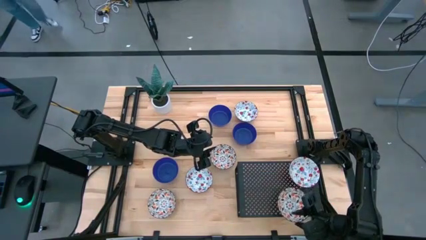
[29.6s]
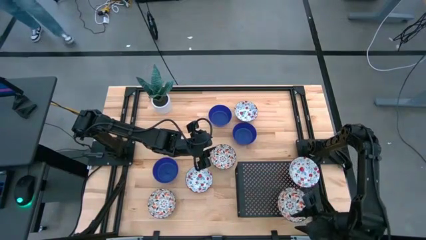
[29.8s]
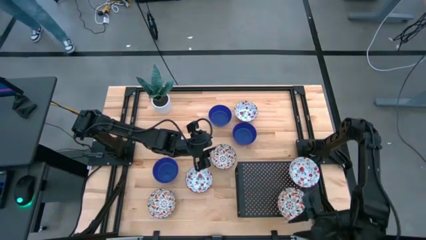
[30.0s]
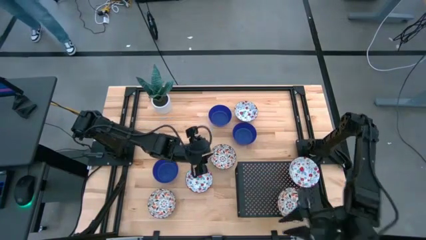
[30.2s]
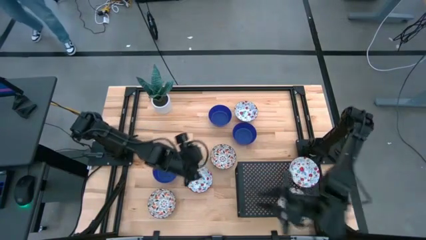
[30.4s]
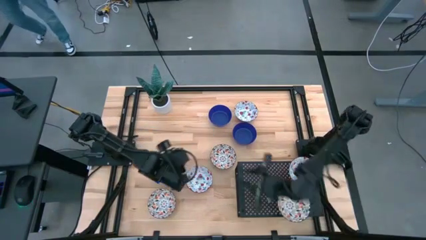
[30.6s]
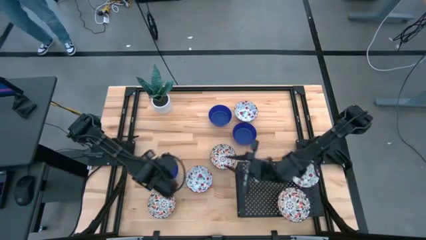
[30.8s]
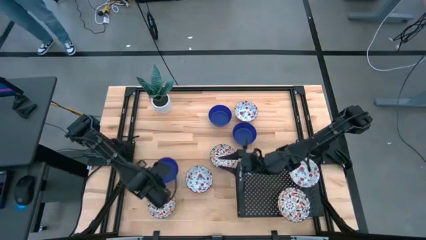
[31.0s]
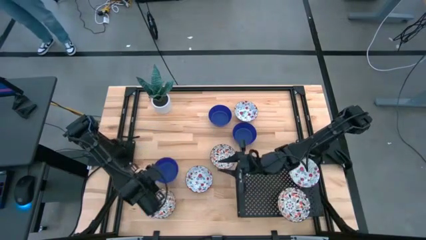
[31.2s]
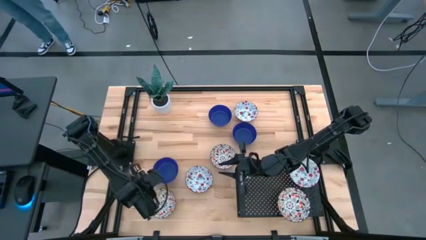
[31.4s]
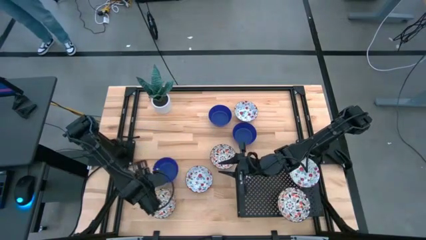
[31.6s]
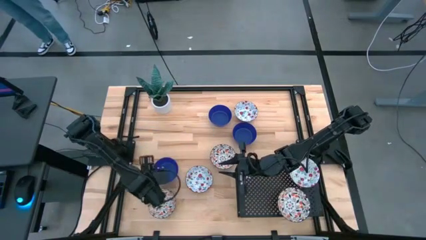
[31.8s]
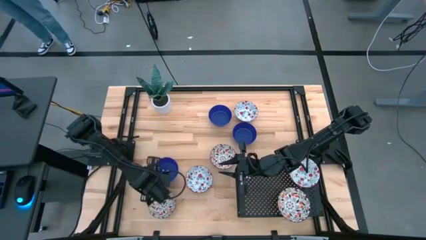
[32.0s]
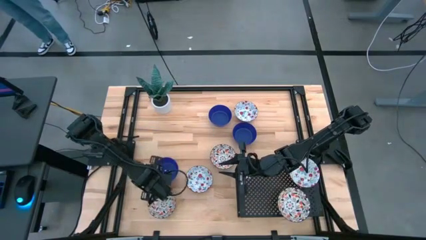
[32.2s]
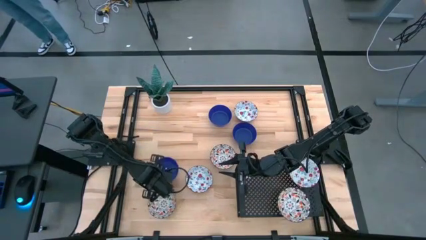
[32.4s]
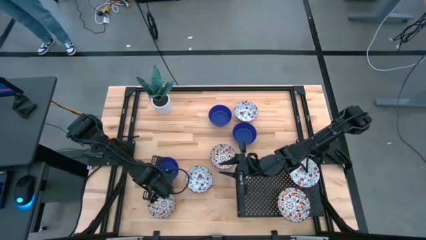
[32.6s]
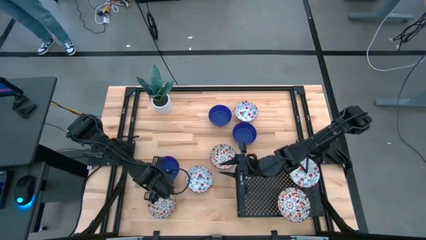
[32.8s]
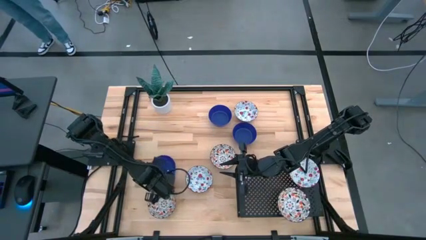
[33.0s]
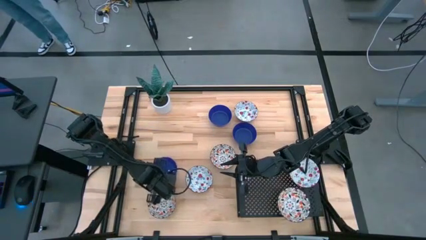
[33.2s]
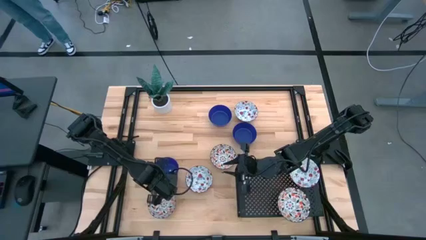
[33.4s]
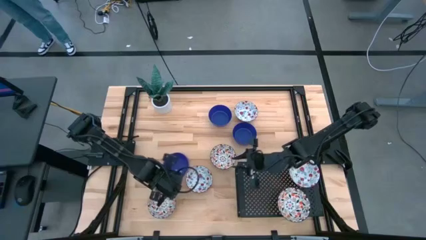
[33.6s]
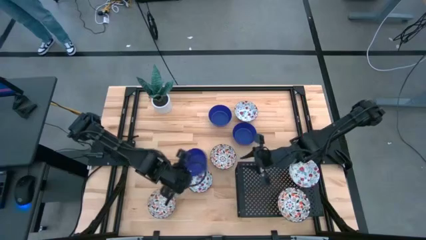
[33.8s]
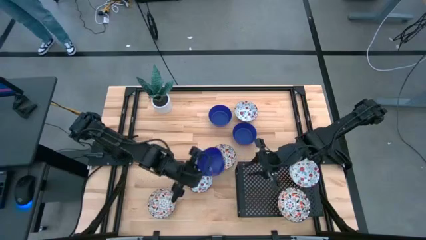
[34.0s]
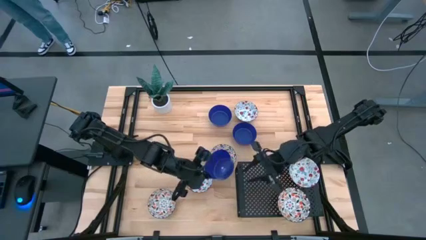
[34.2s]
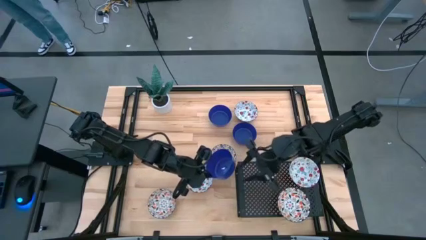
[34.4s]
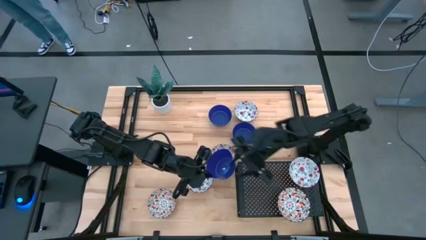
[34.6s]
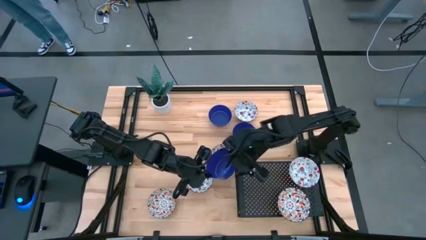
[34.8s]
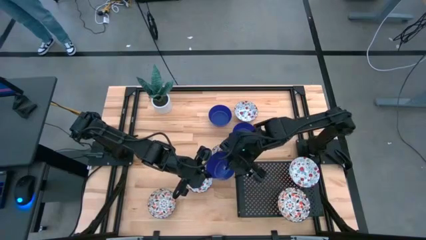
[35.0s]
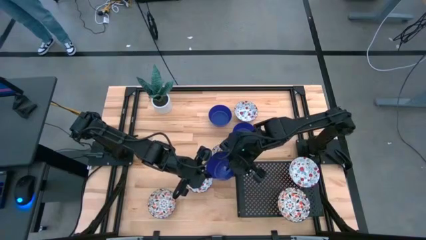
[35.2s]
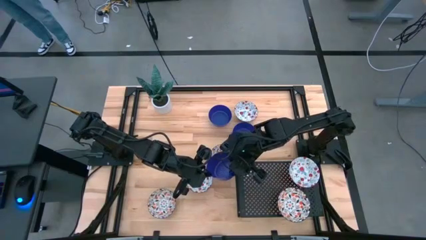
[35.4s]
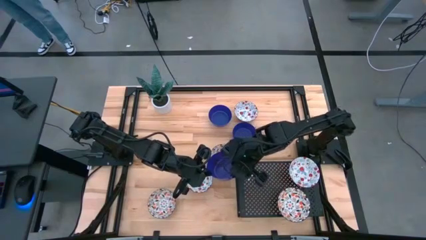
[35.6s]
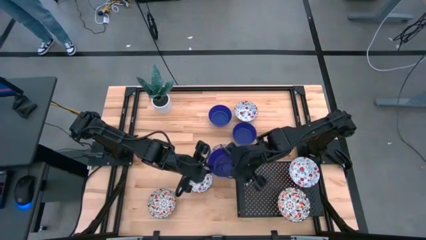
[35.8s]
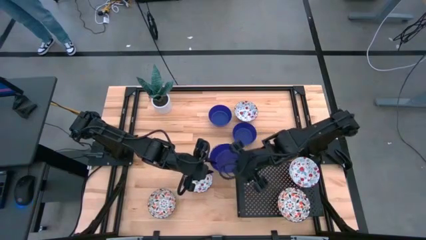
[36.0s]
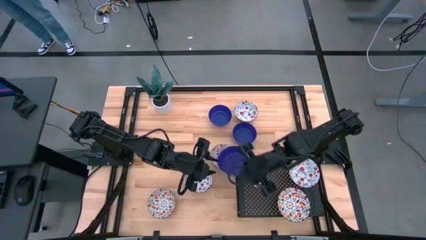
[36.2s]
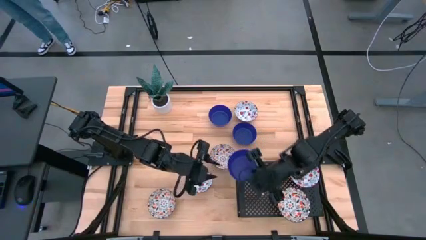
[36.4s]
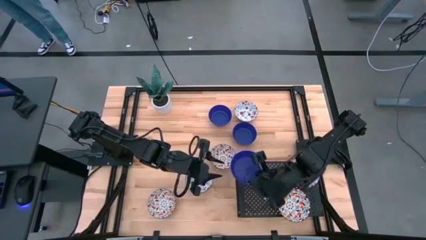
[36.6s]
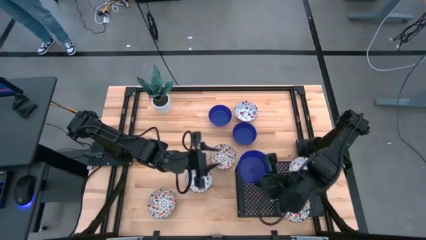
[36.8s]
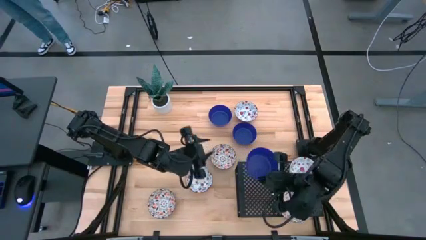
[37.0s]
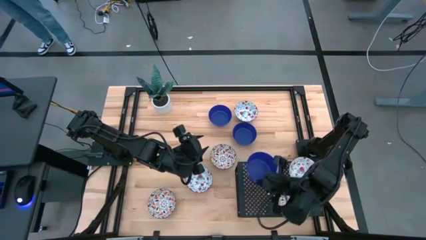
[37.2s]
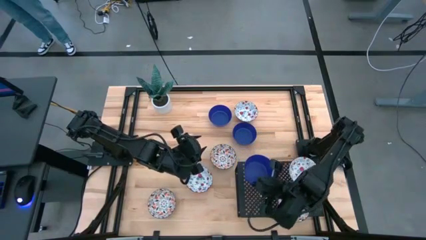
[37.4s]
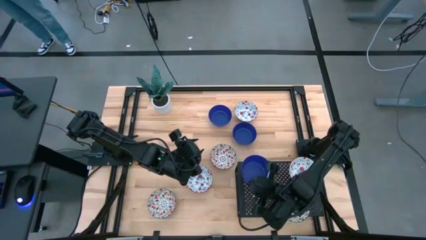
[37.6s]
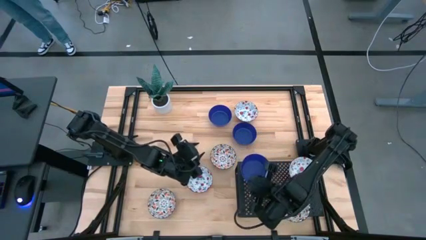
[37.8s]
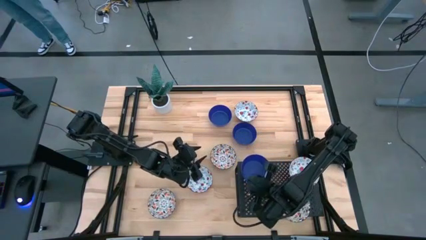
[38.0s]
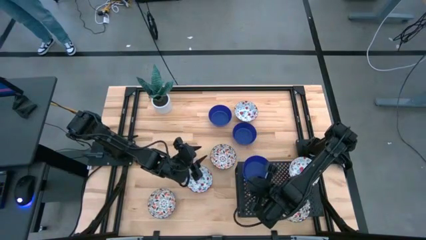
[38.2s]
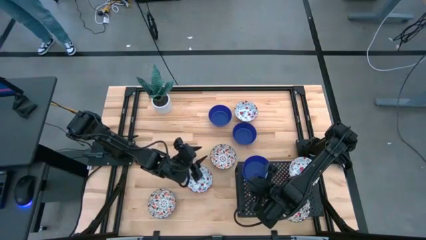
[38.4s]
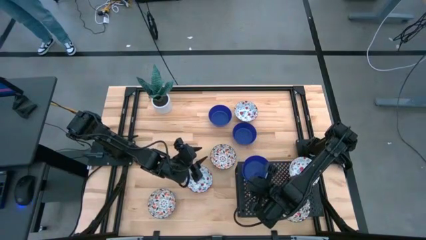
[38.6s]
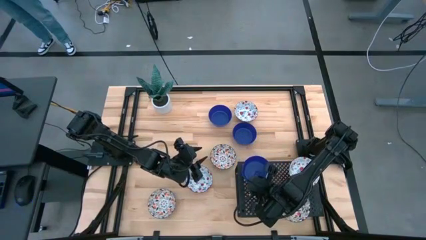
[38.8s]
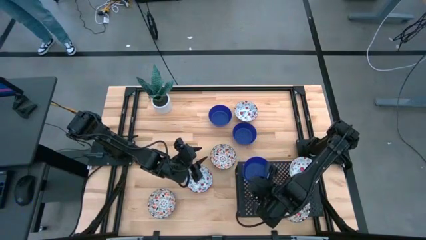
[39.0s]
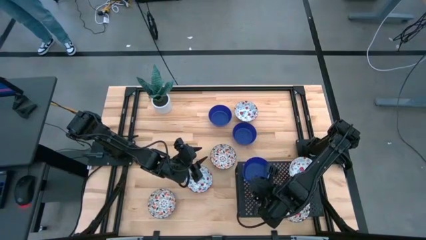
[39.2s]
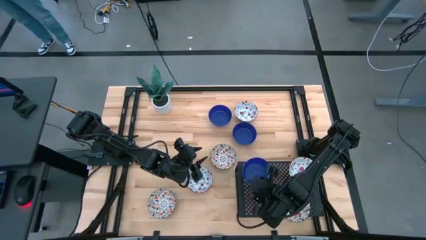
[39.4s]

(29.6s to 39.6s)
Task: Pick & Place Mini bowls
Put the bottom blue bowl on the shelf
